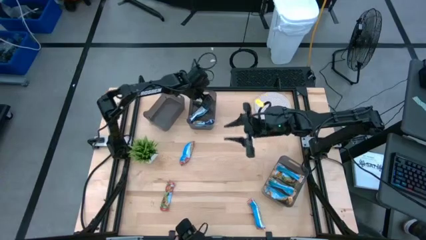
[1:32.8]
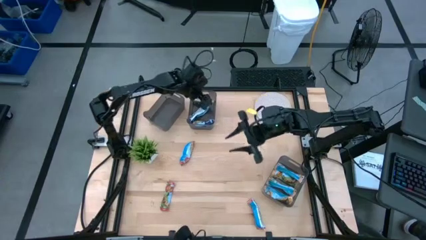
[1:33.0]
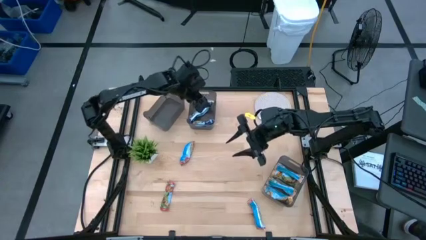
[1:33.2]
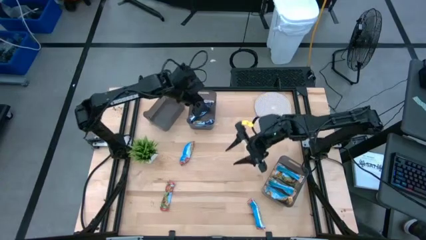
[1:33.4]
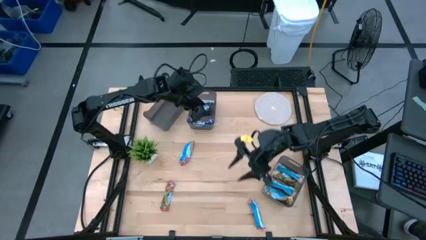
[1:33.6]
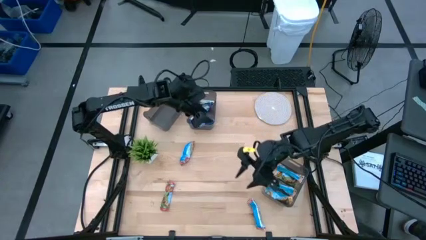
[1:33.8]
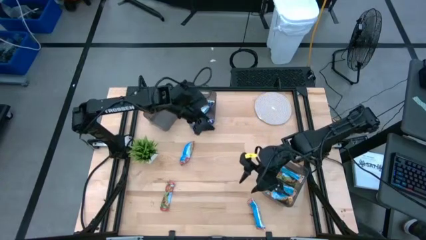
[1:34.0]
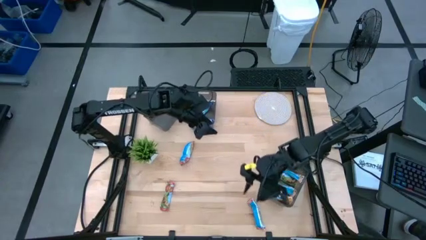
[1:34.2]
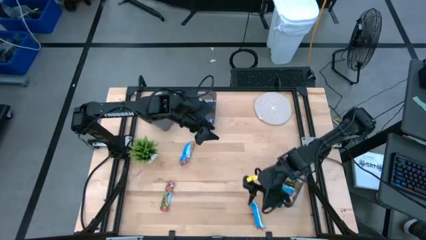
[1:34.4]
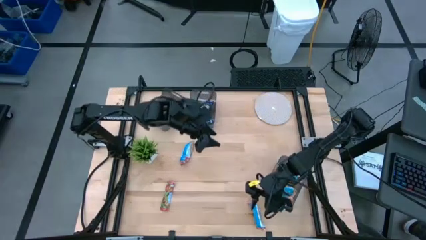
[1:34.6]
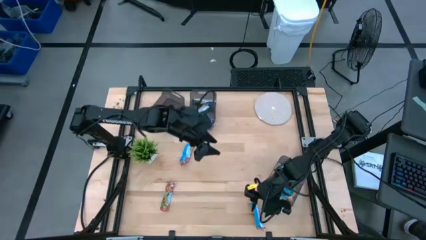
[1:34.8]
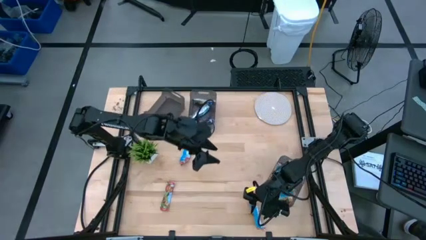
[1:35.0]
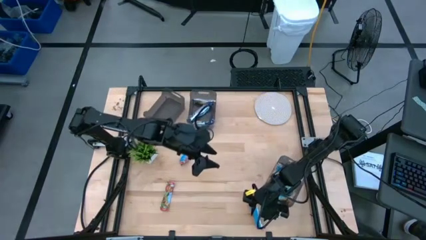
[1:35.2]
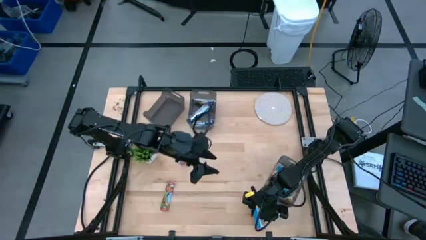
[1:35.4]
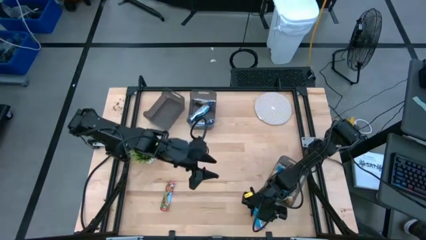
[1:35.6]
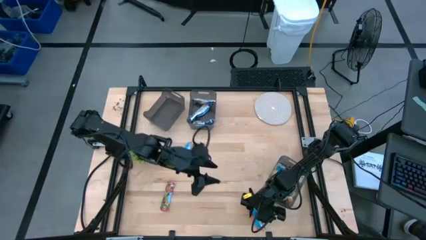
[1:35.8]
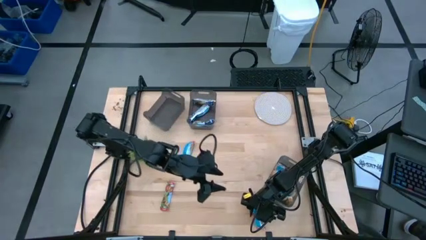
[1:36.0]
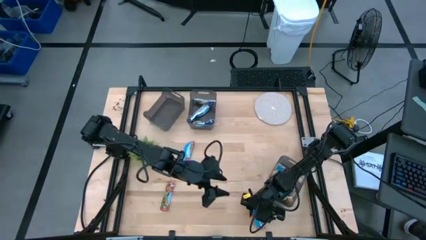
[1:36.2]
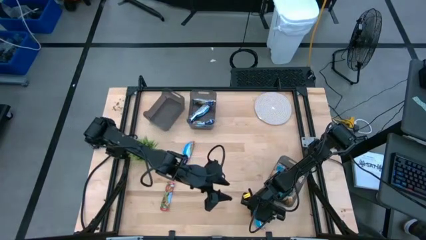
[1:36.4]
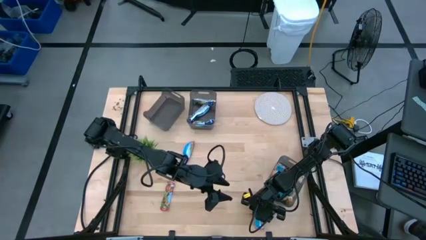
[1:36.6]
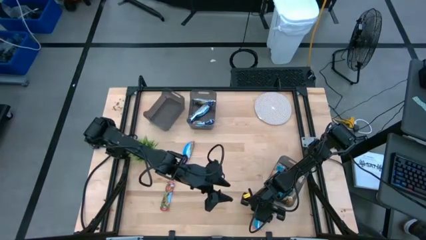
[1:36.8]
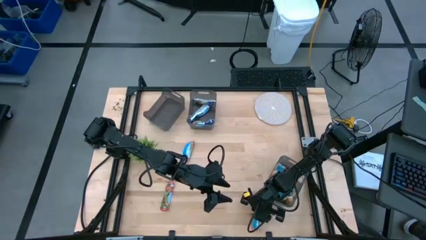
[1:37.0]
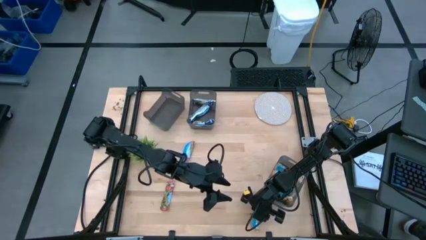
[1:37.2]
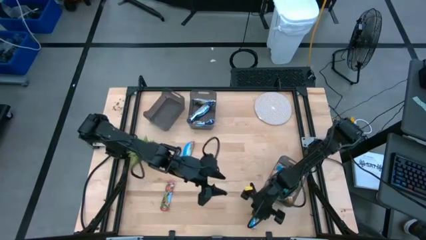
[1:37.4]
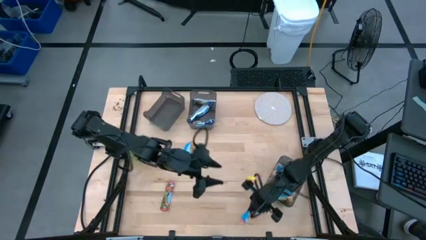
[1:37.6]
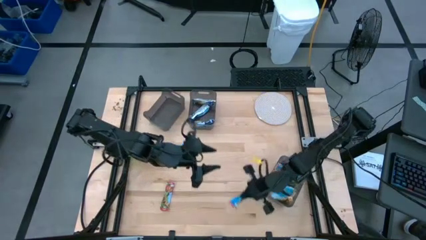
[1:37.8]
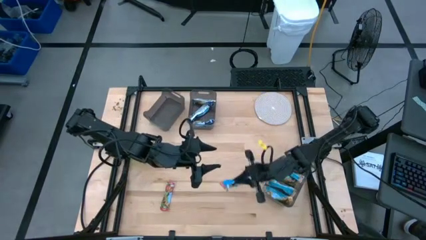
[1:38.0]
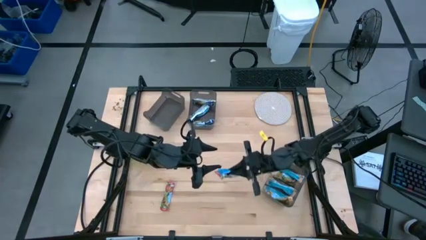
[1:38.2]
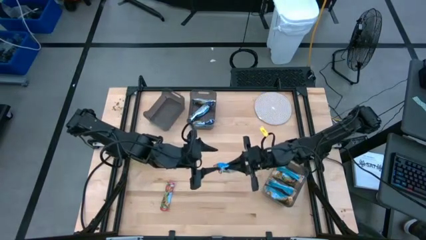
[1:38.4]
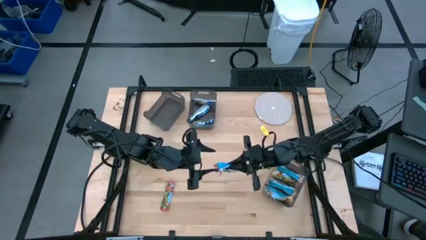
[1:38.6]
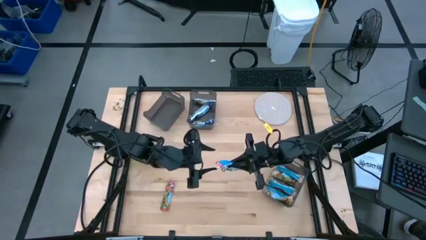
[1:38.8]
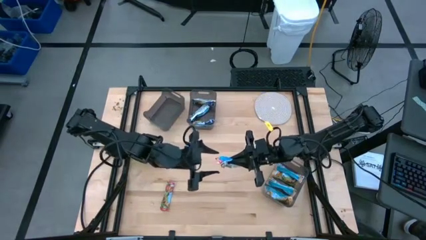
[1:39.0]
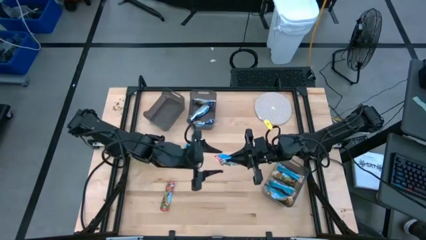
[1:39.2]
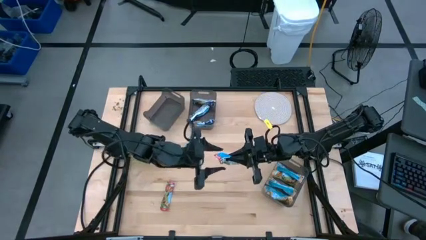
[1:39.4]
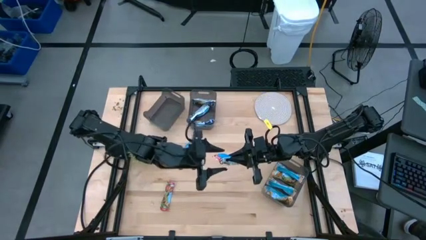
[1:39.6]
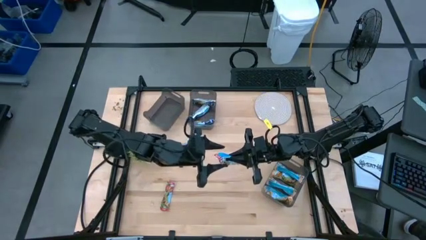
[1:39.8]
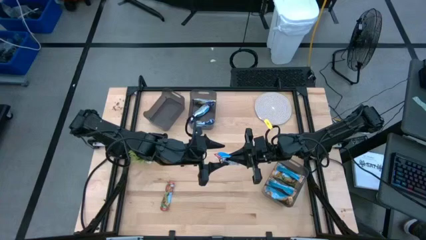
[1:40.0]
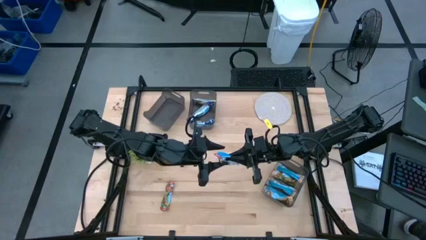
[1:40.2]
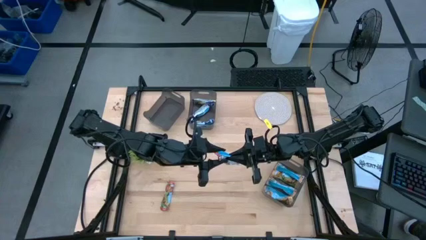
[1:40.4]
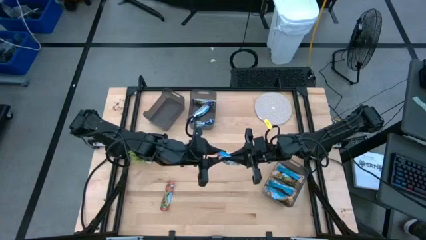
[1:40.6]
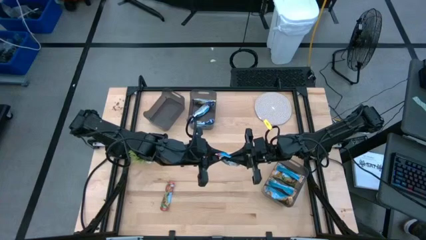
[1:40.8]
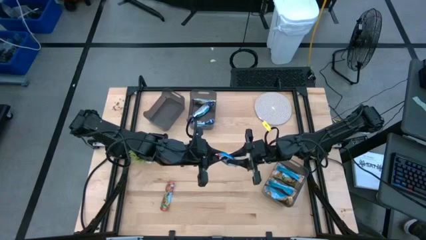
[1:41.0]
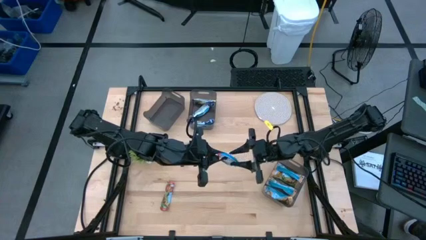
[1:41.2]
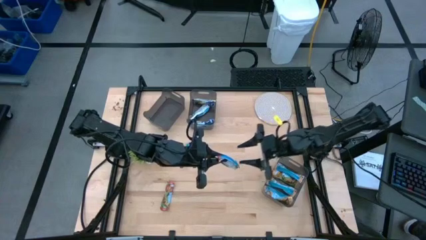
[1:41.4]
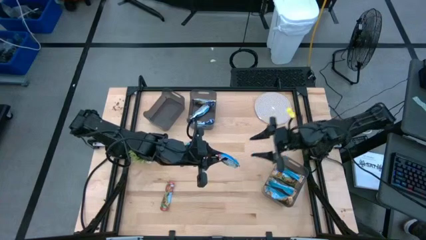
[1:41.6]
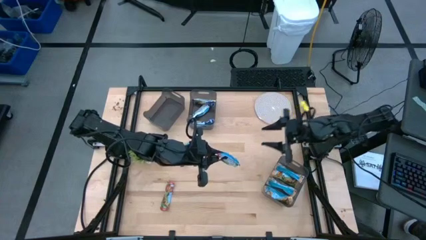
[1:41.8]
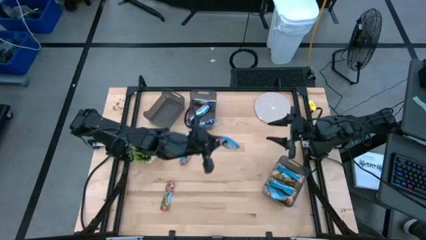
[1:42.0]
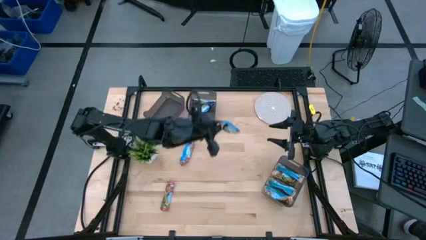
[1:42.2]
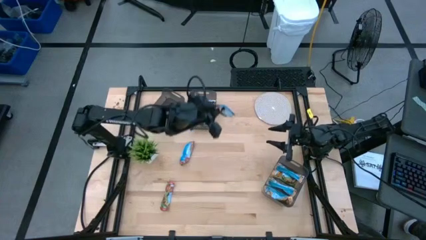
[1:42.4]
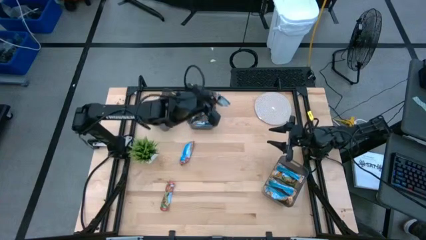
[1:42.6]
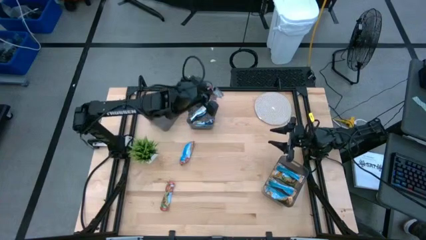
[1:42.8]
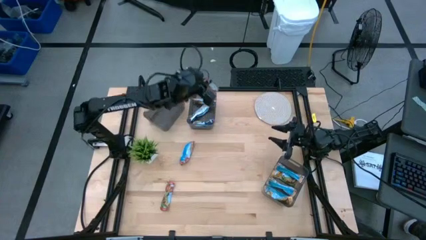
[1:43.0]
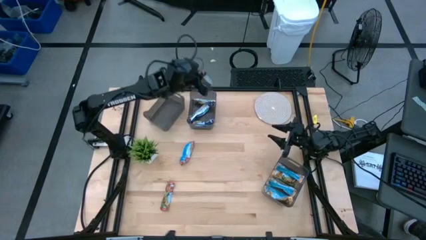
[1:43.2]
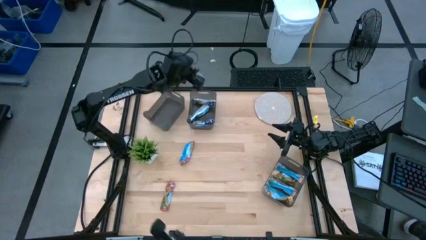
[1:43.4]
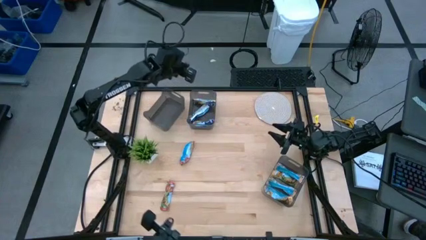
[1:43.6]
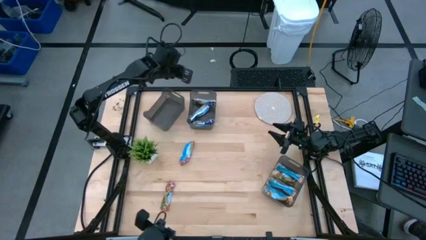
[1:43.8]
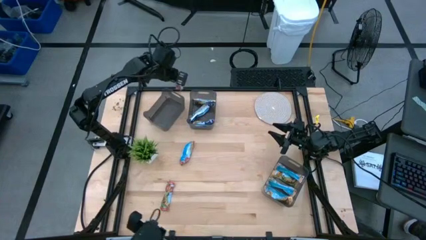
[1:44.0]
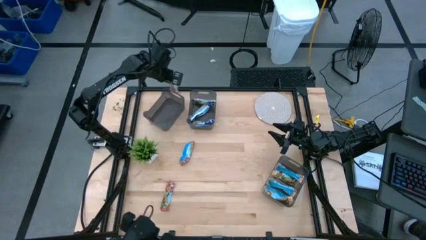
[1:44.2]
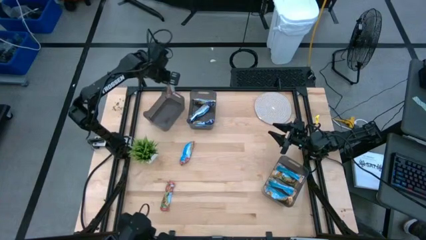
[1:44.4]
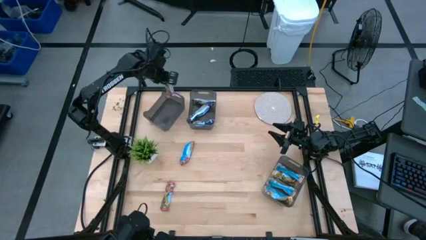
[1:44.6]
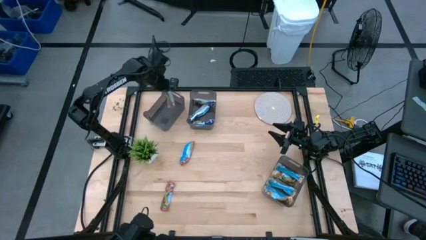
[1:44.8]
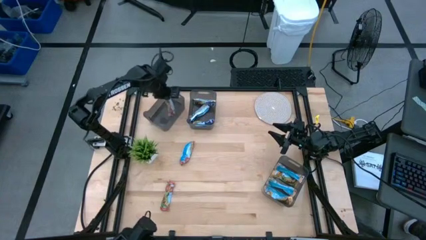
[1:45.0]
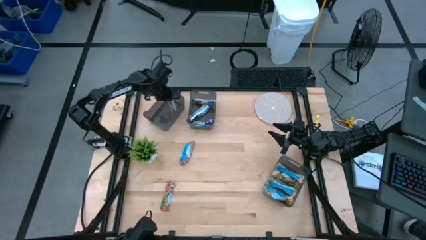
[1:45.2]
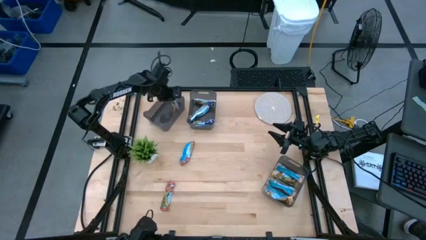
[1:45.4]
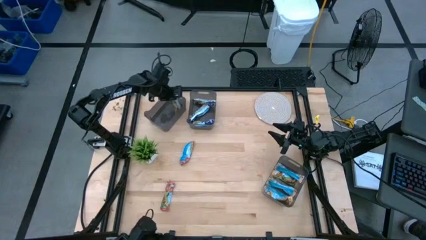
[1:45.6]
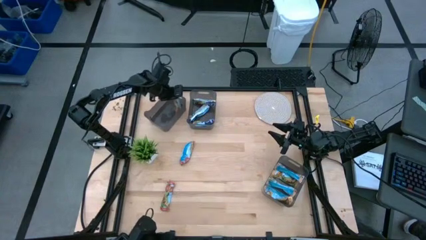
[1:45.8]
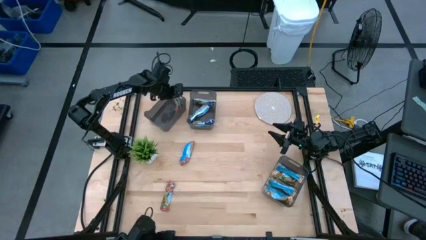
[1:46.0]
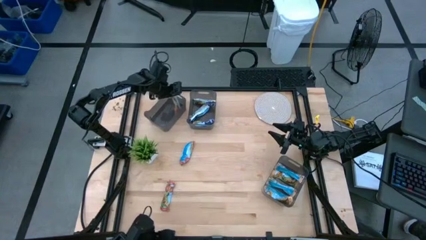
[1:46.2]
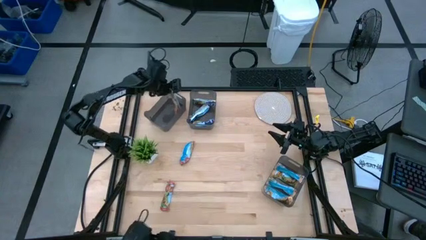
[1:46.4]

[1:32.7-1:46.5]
Task: Pick and place Granola Bars by type
Put the red granola bar into the top left black transparent bin
